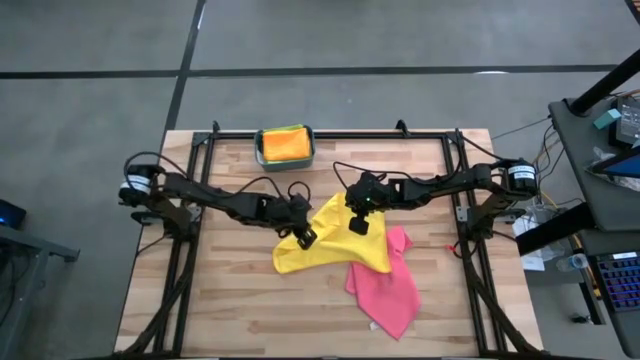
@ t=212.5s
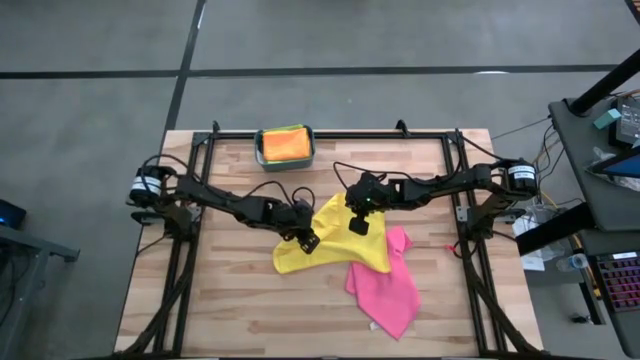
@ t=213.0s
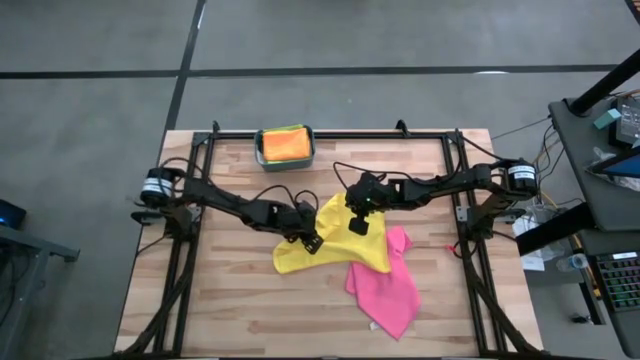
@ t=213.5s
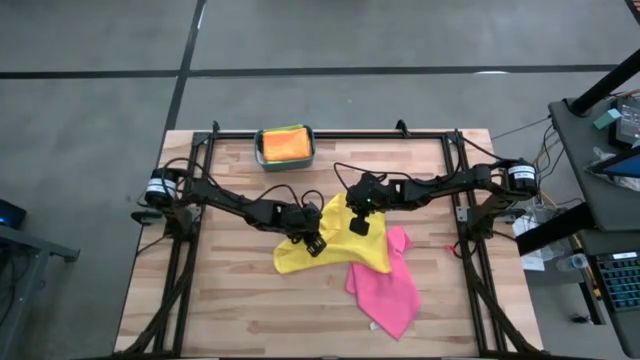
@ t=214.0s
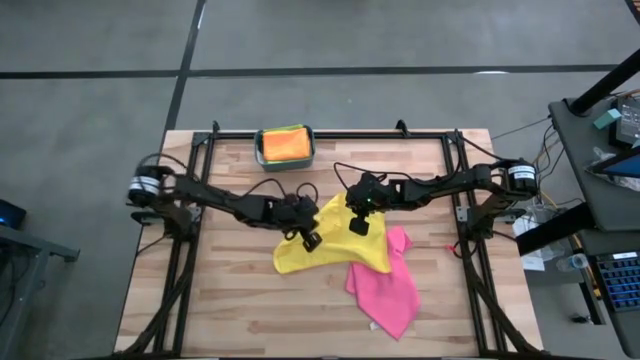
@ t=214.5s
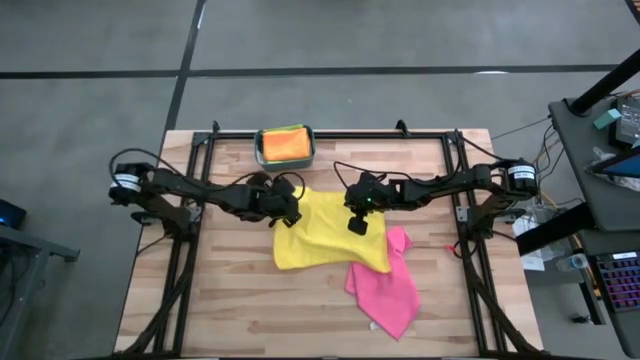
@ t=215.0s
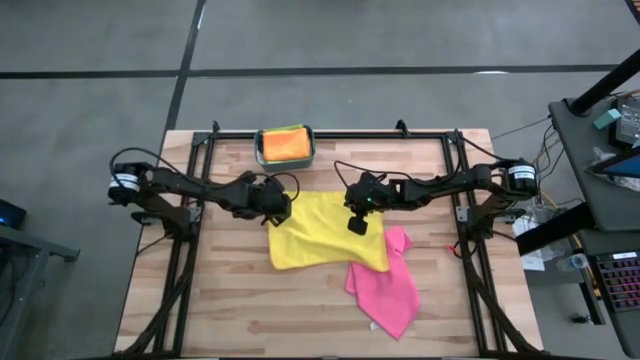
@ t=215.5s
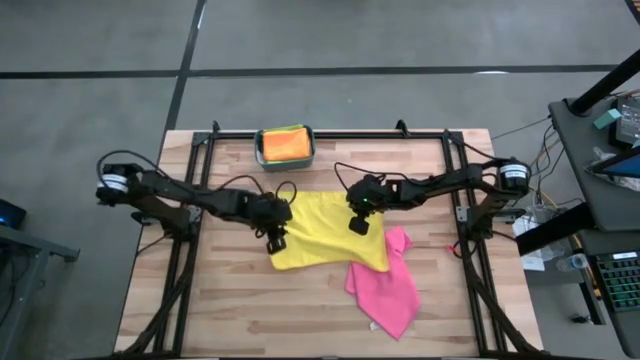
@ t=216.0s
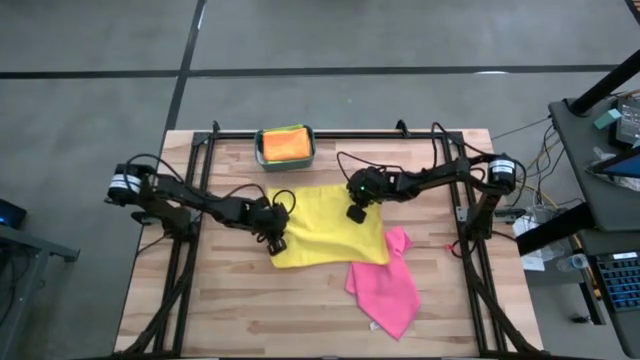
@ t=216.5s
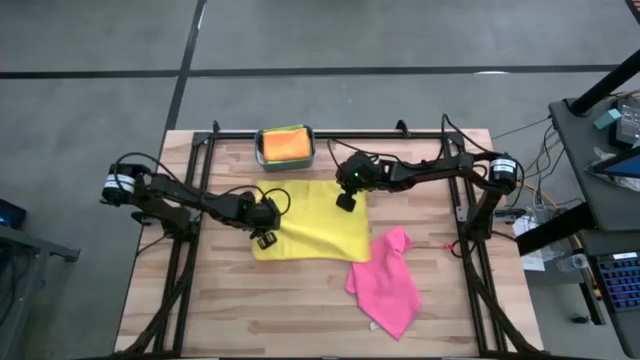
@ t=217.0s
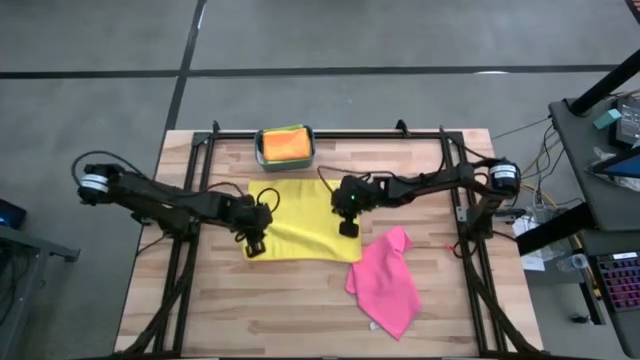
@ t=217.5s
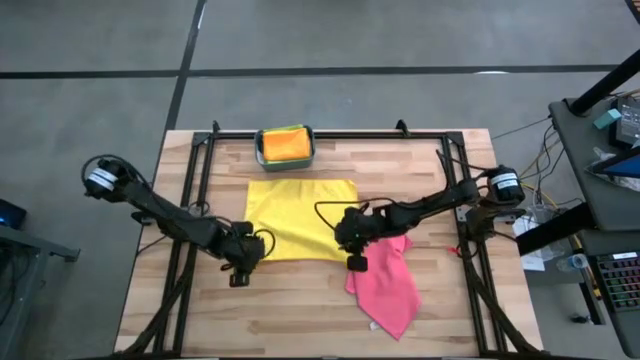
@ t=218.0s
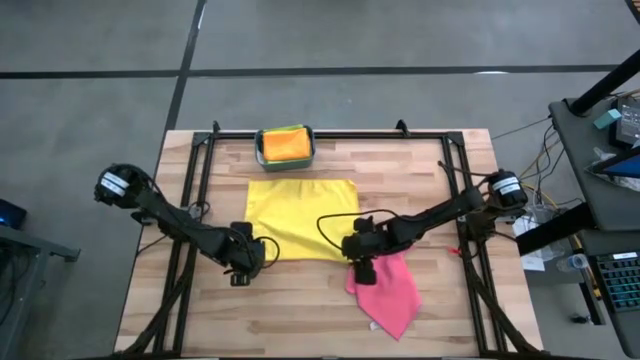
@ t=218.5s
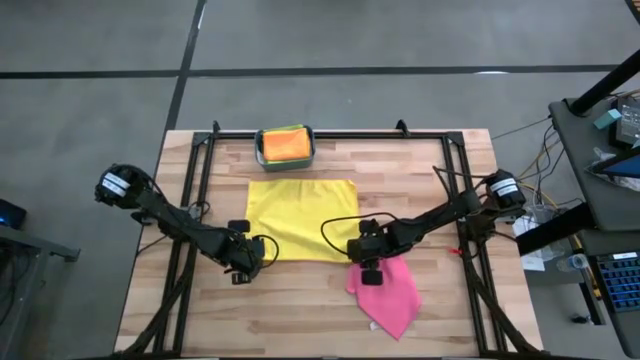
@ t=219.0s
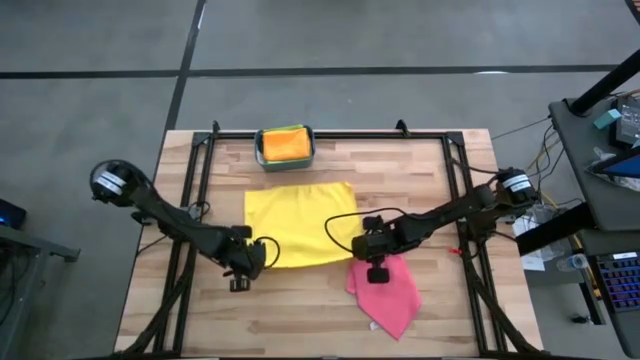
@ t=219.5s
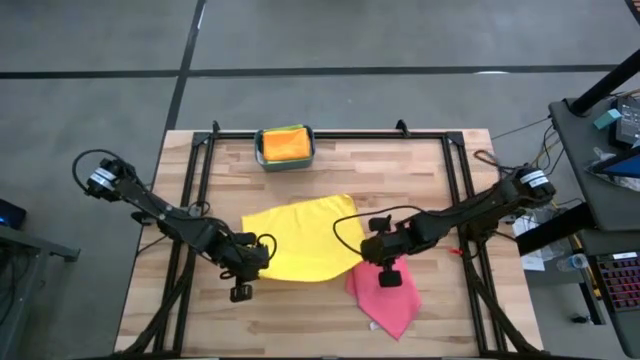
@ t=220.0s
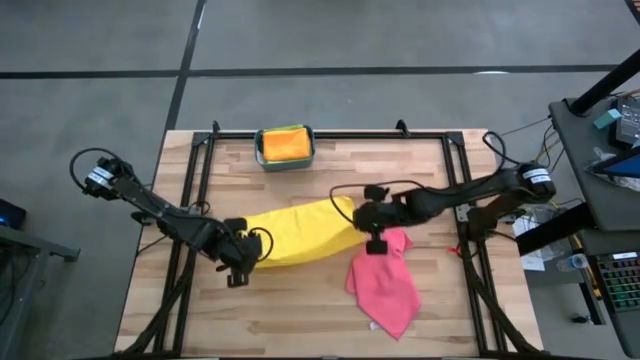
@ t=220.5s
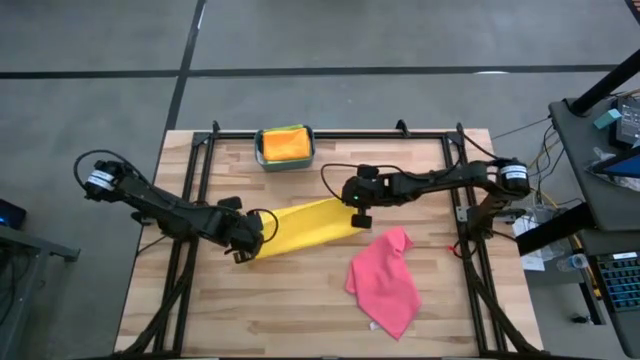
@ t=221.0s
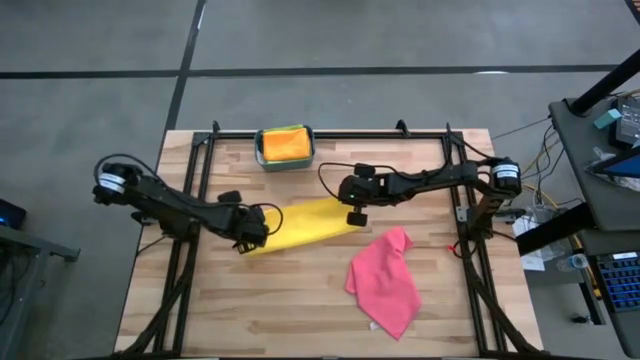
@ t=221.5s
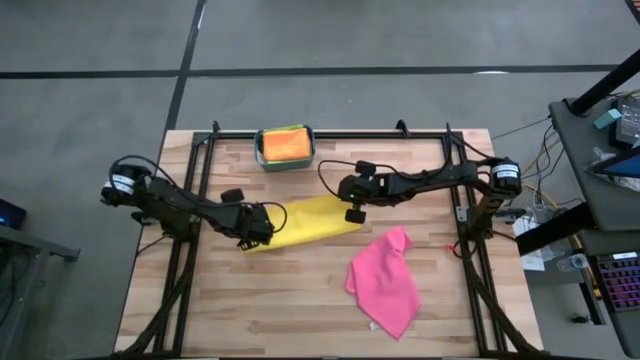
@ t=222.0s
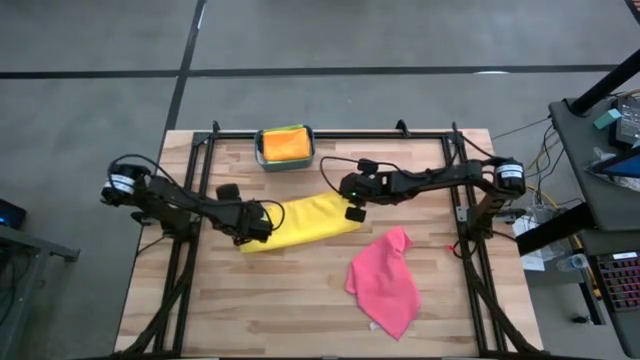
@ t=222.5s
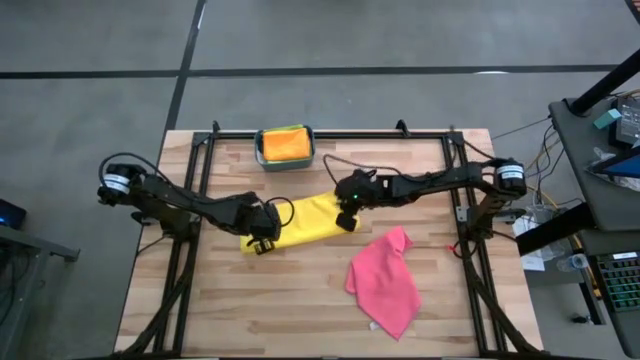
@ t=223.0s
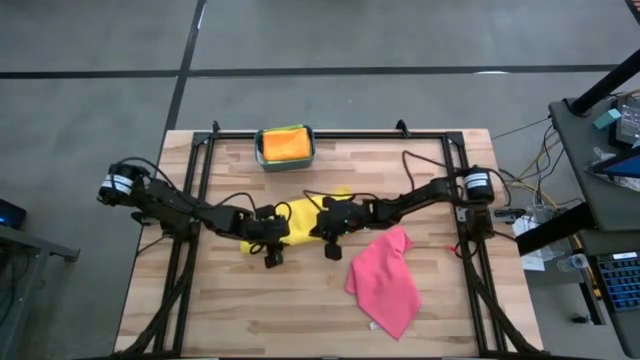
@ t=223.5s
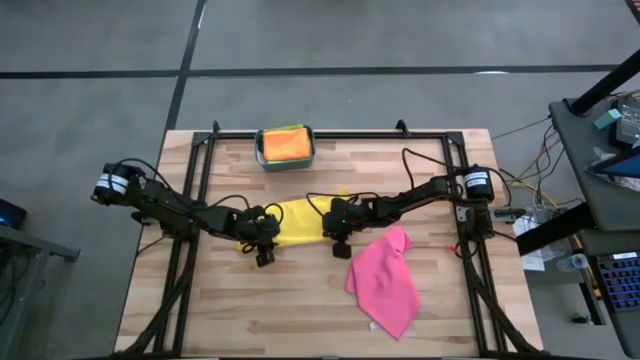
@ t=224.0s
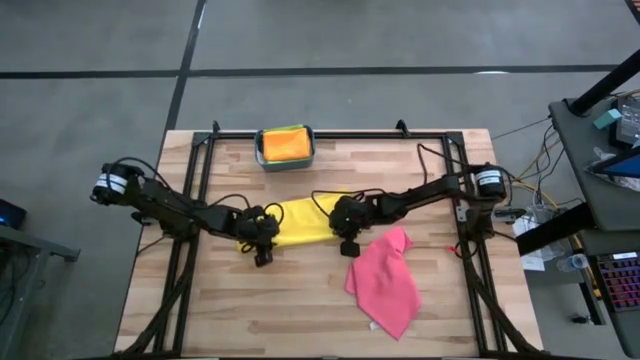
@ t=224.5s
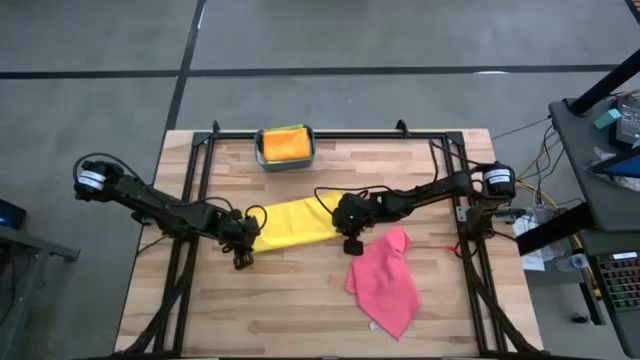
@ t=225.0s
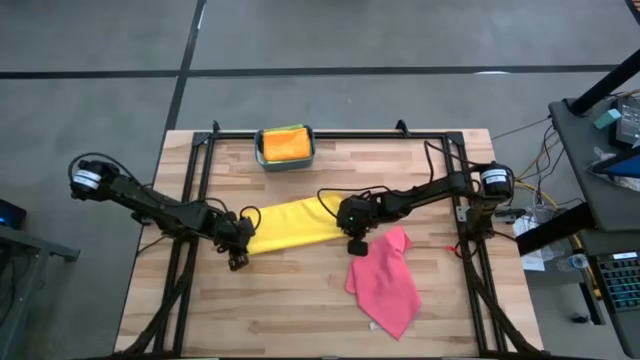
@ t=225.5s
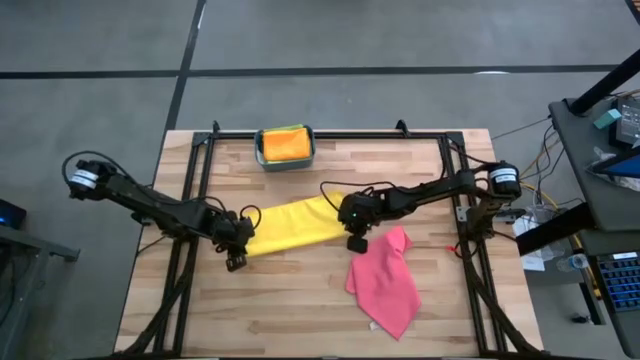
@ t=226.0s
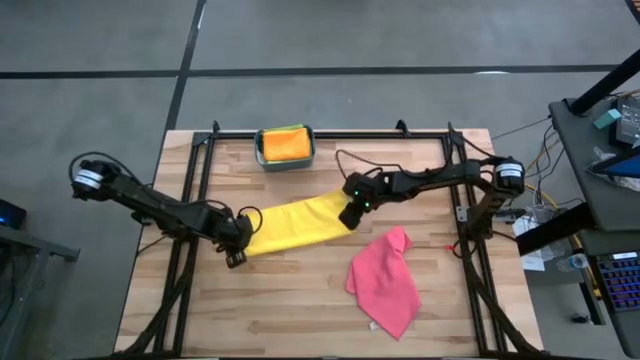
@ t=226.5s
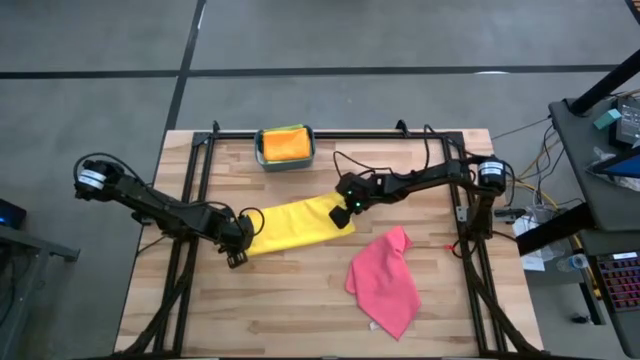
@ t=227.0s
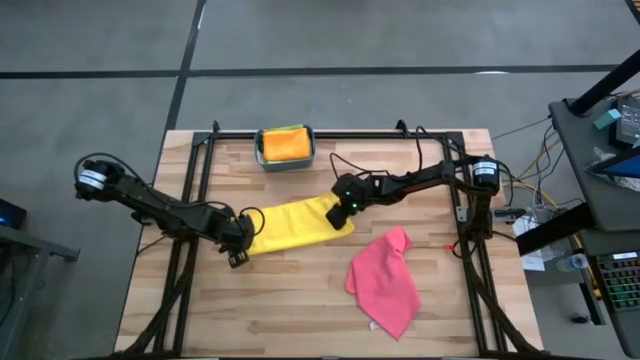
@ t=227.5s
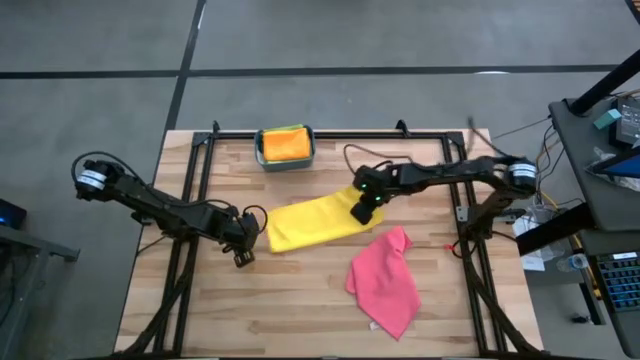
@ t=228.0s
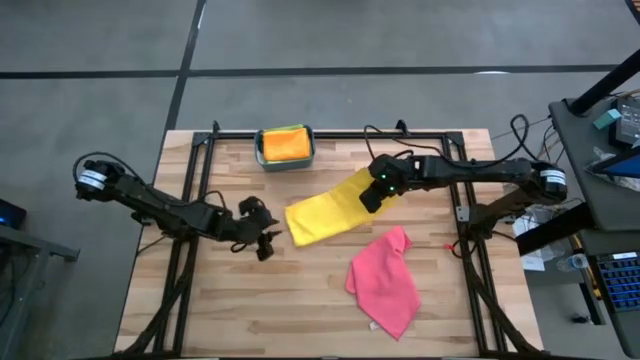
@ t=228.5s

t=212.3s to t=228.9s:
Task: Fold microfiber towels
Fold the yellow towel

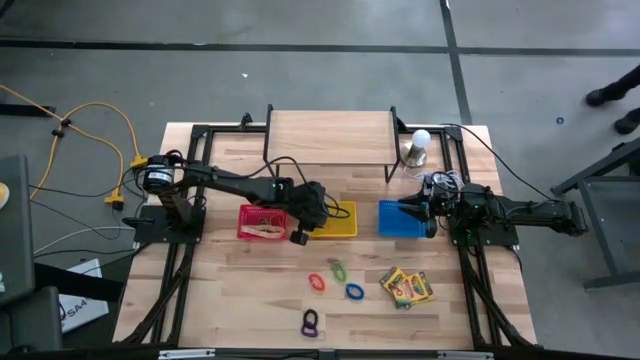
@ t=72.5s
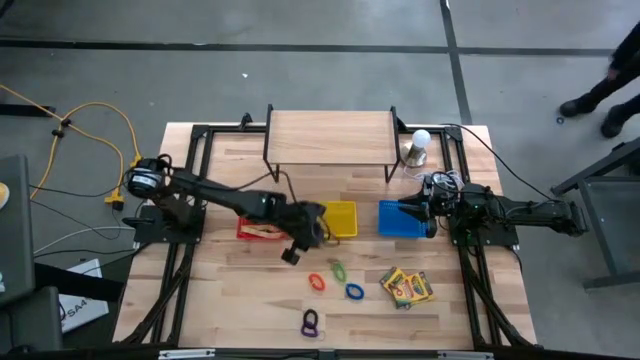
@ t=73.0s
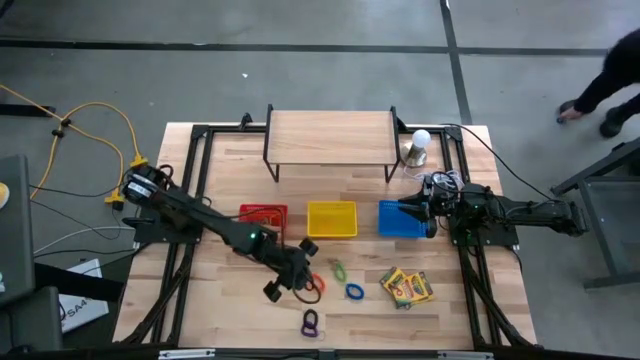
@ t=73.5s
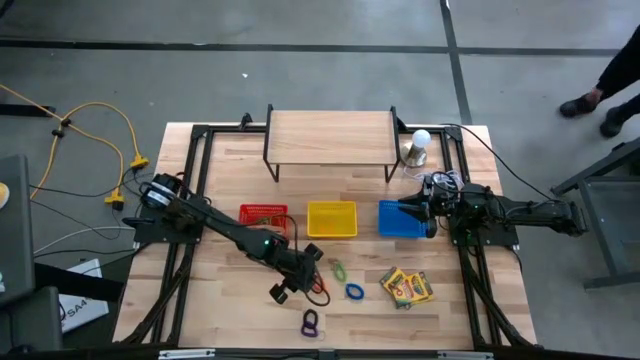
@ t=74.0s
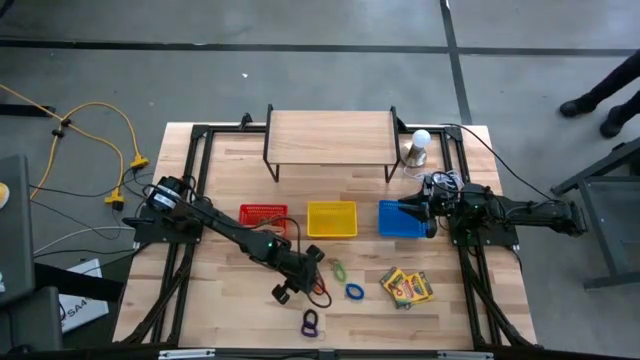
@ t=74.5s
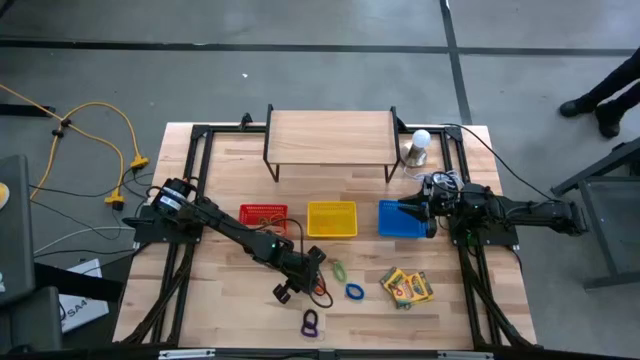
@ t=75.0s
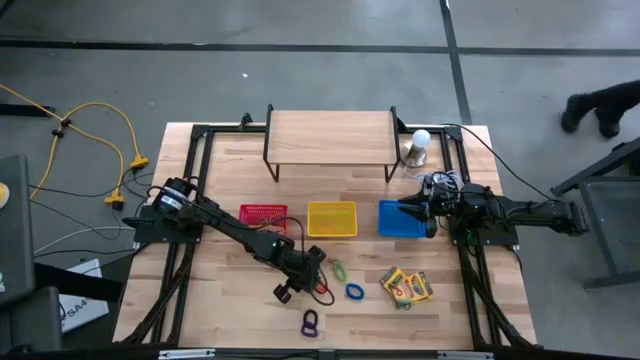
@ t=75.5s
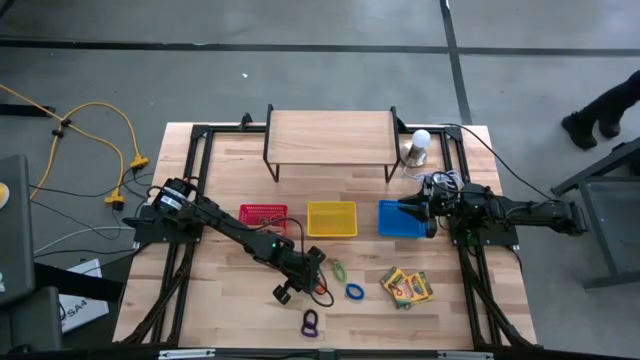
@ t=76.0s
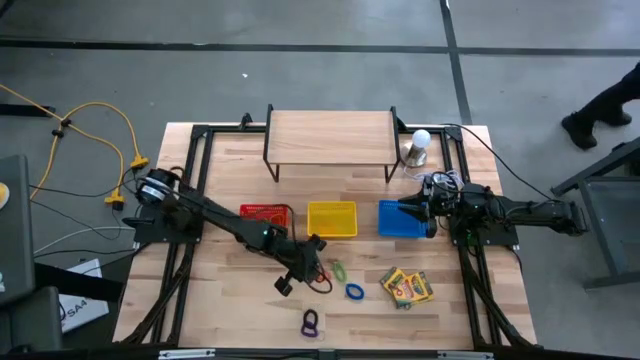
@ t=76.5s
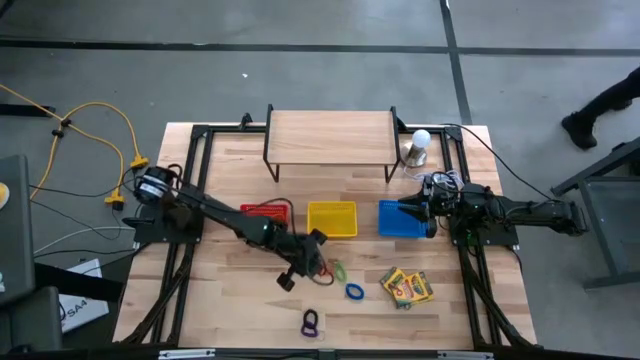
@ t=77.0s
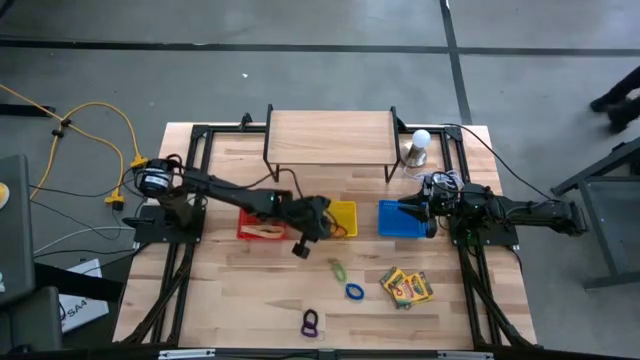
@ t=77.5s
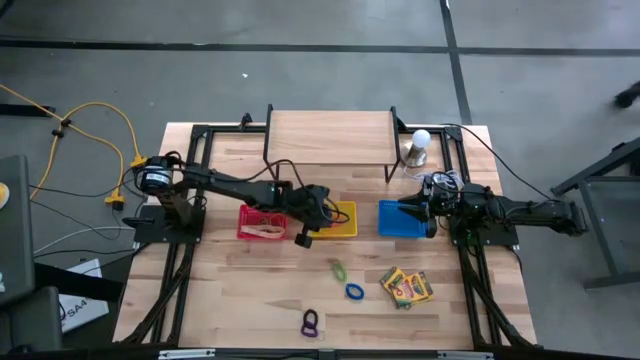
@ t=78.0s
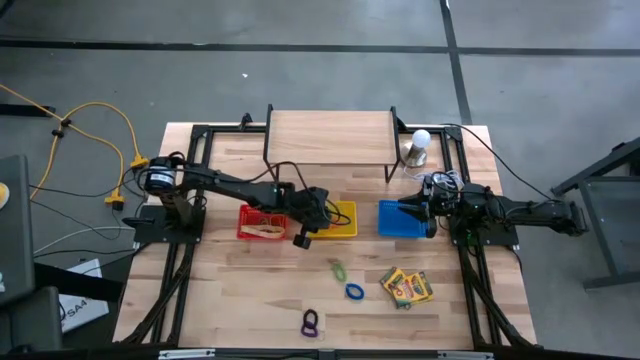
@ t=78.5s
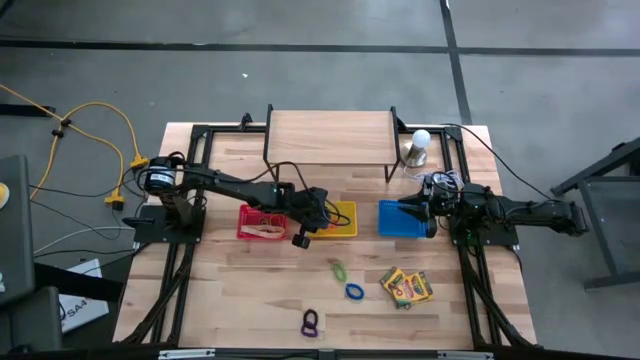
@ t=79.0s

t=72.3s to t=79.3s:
Task: Pick & Place Office Desk Supplies
Put the orange spring keychain into the yellow bin
